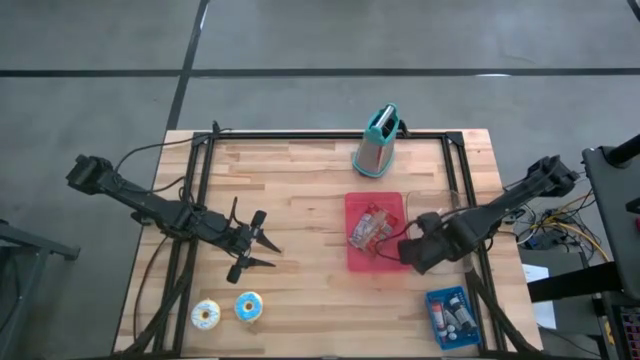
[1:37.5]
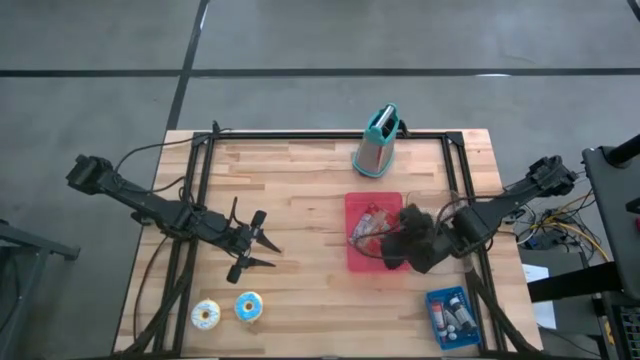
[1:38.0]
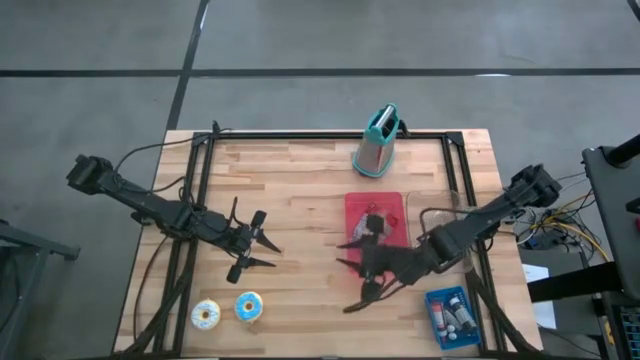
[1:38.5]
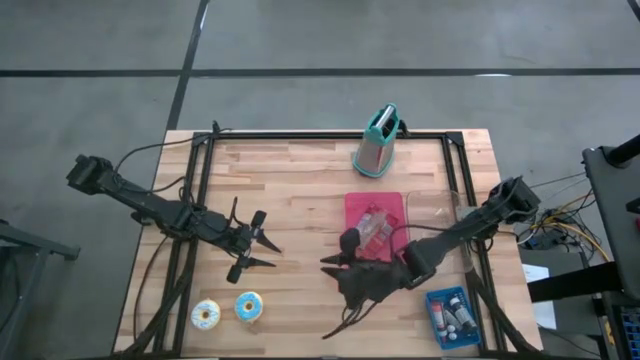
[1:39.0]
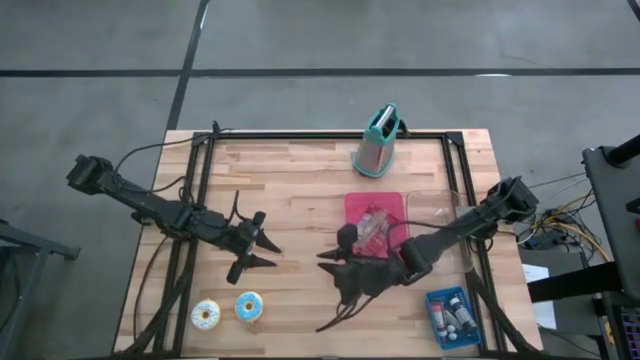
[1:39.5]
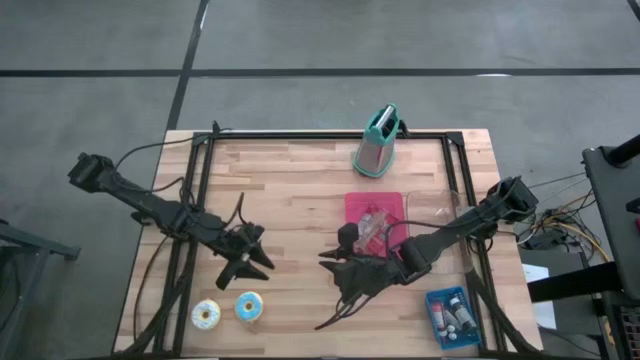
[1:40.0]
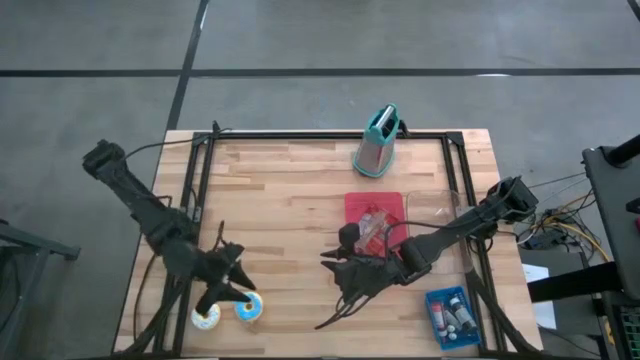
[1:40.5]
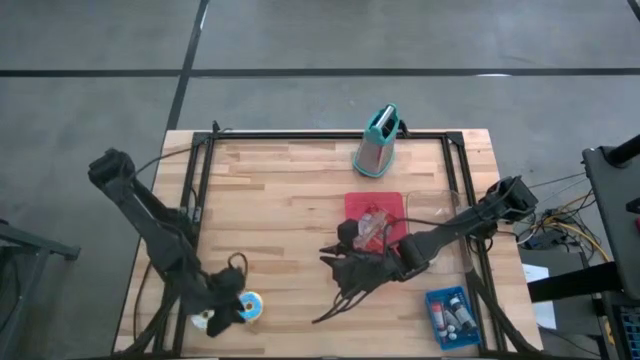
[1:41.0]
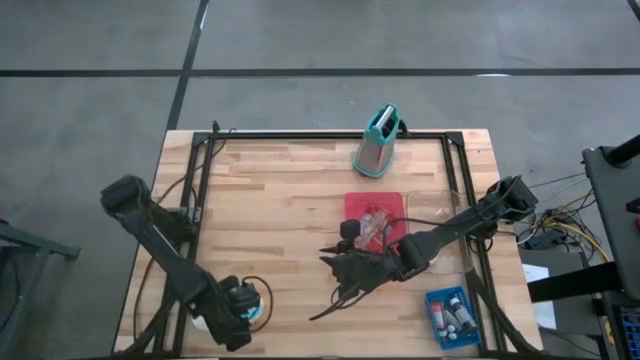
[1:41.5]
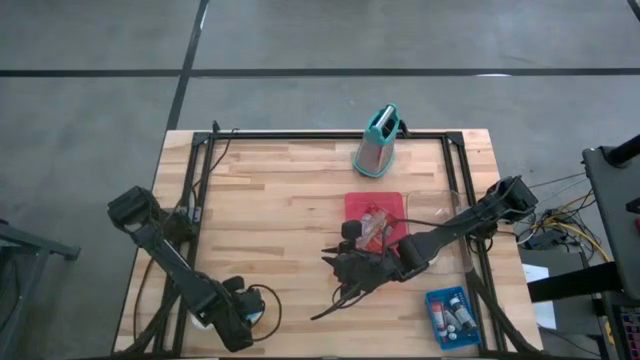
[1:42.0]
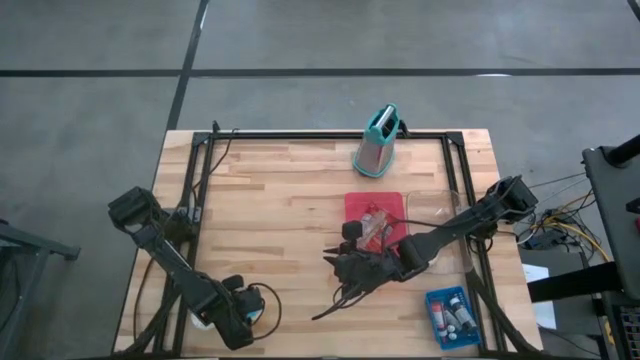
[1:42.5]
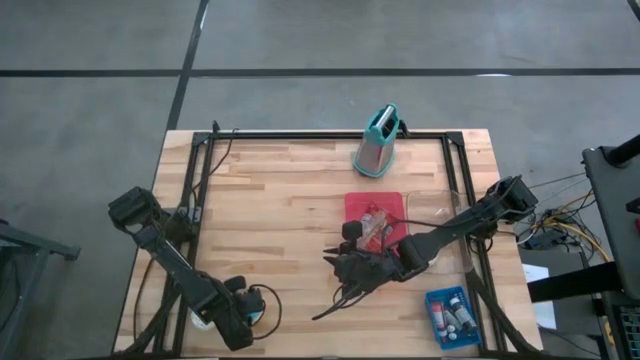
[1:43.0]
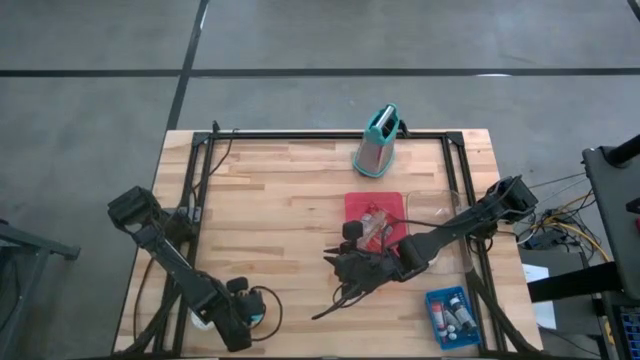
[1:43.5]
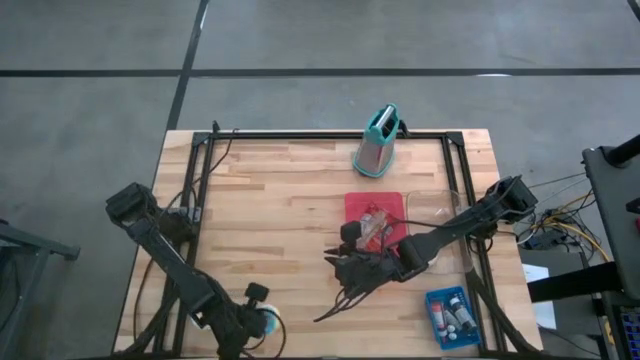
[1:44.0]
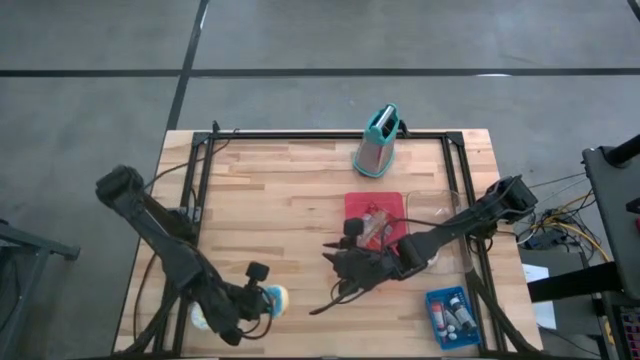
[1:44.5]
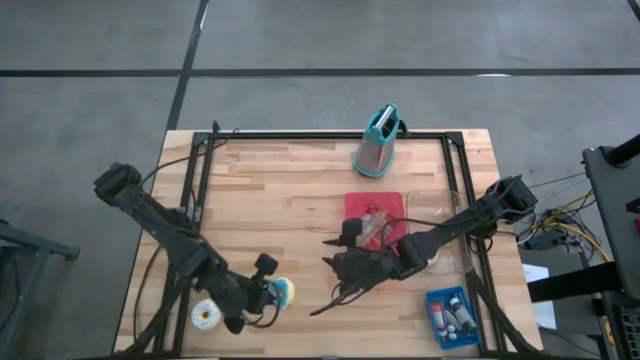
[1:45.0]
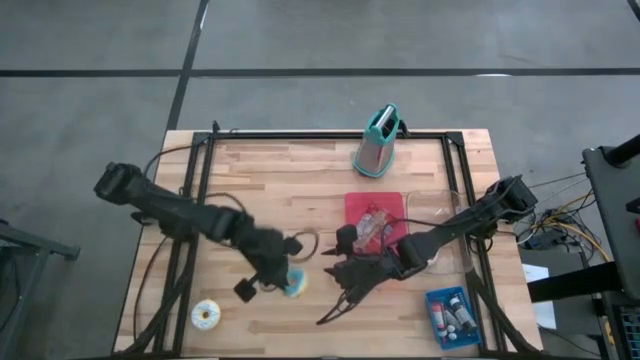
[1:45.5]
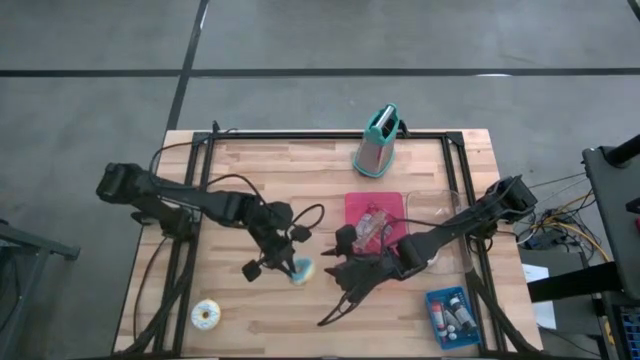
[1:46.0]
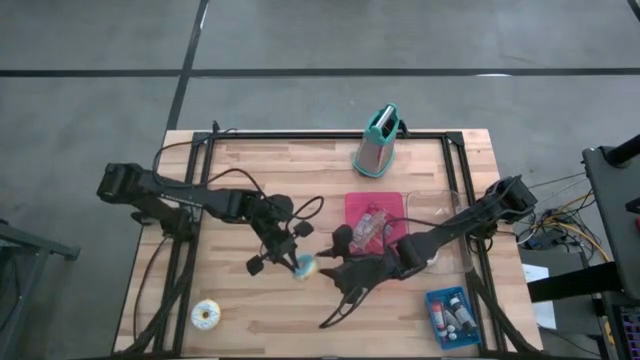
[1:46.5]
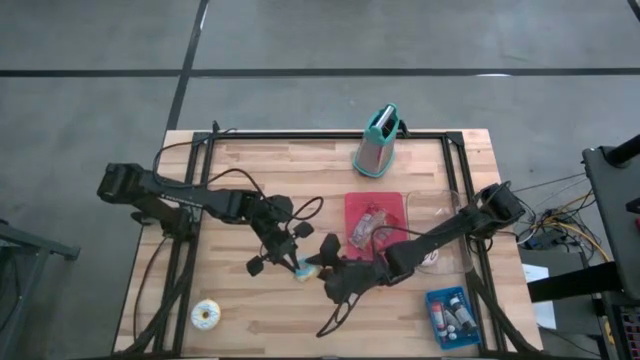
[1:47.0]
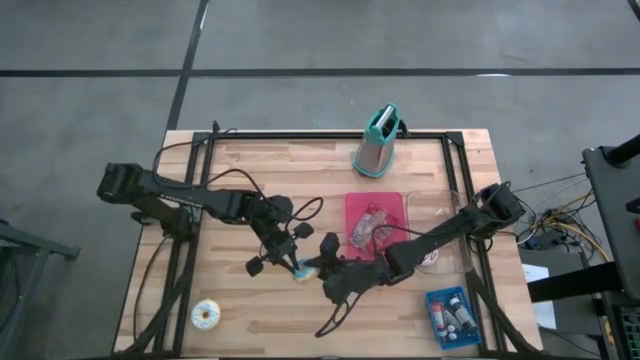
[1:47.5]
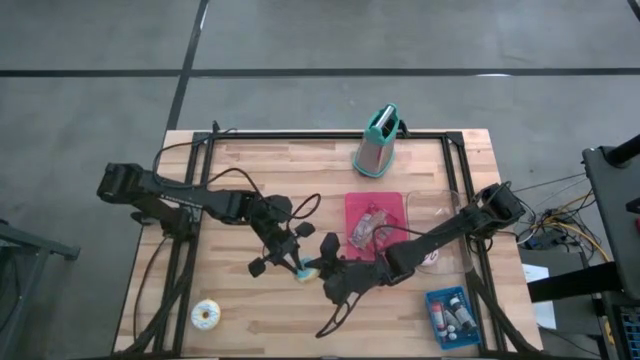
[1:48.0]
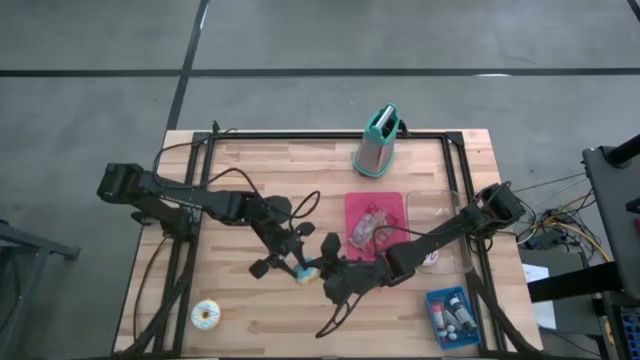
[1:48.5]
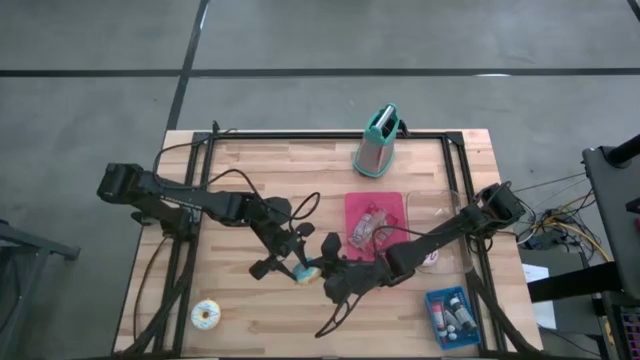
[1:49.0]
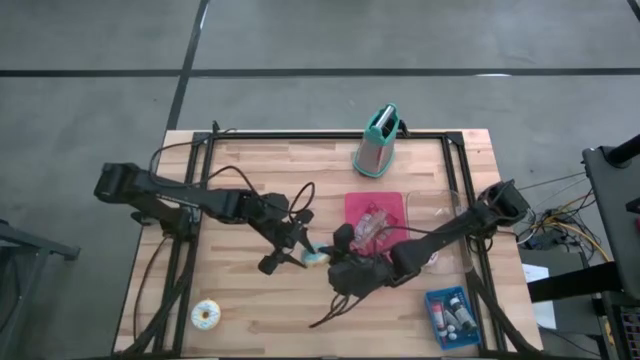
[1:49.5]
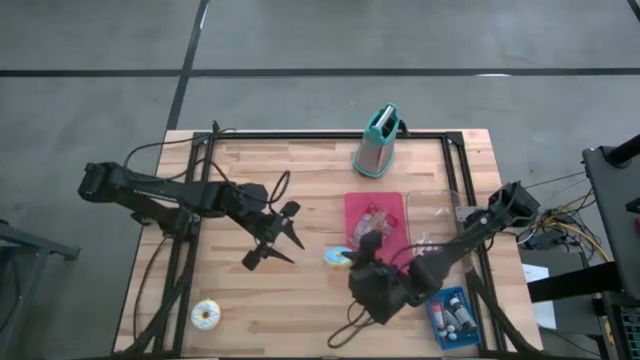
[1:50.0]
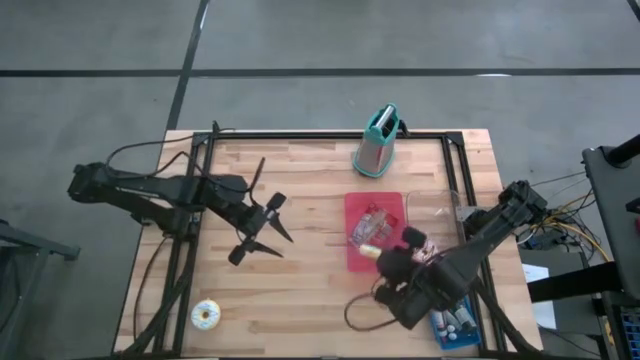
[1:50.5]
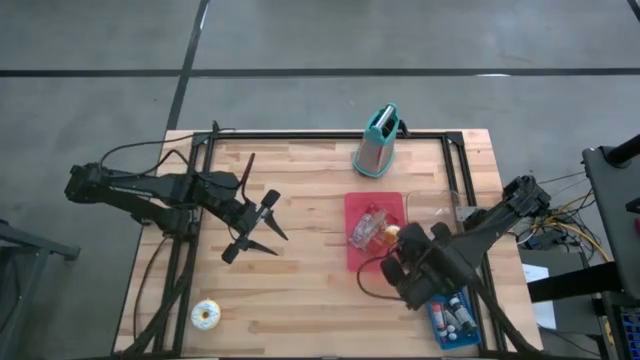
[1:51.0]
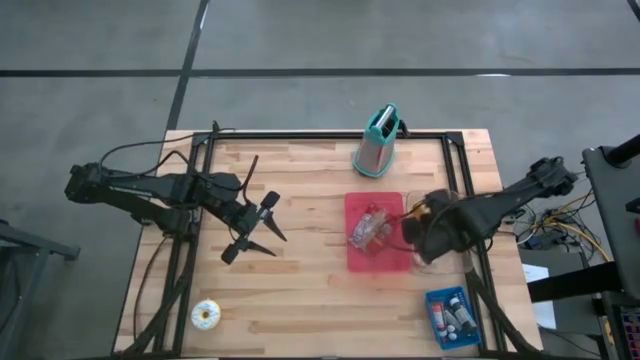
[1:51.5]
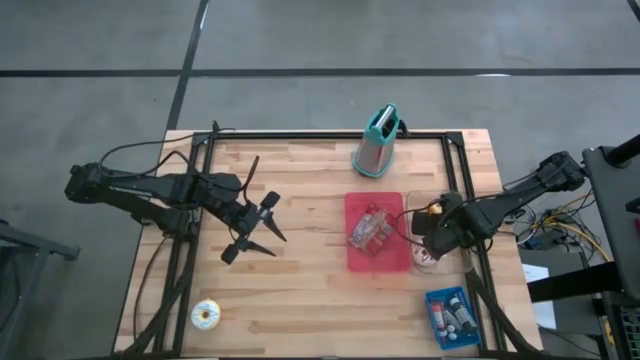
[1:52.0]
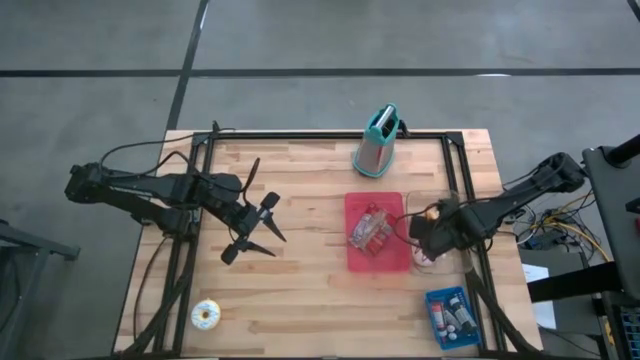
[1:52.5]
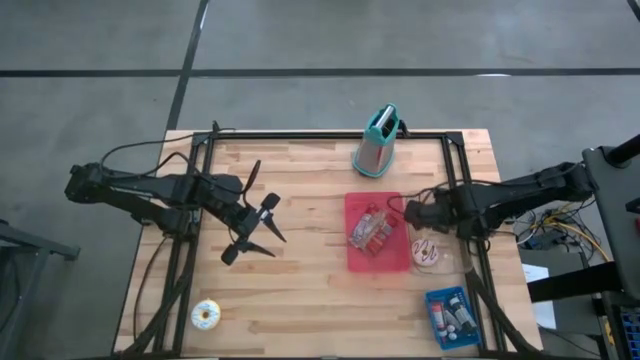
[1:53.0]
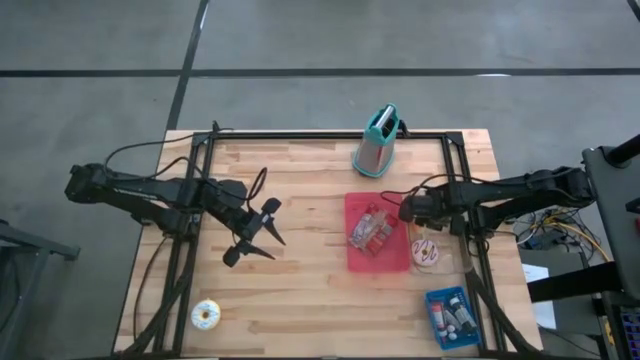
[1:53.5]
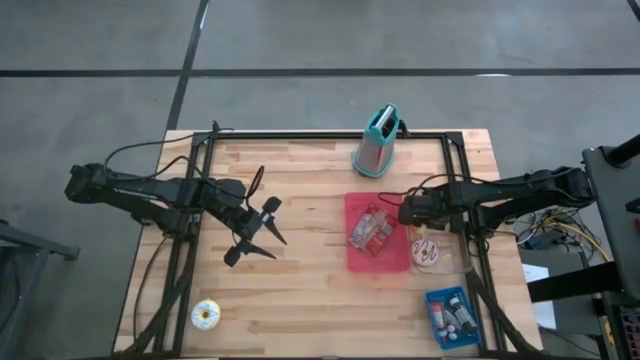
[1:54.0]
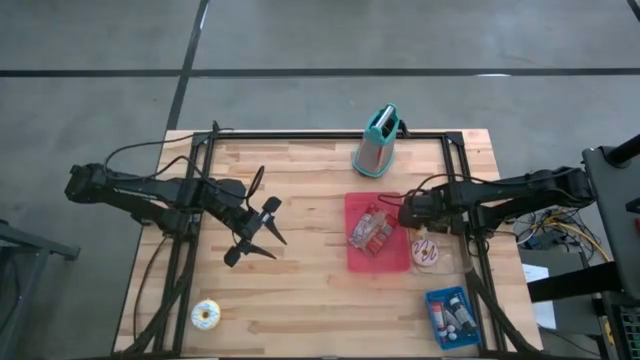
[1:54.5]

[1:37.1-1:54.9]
Task: Pick & Place Food Item
Put the blue donut into the transparent bin
